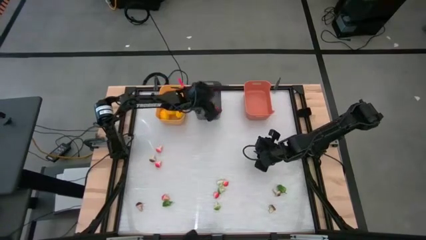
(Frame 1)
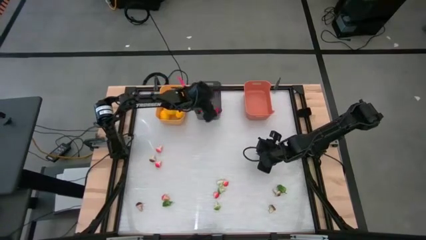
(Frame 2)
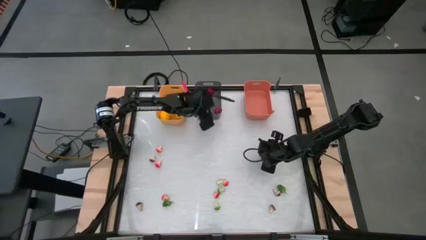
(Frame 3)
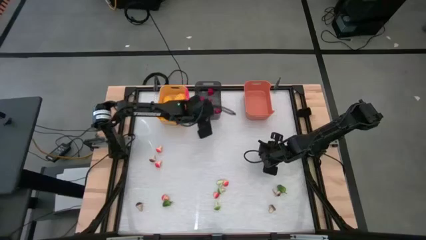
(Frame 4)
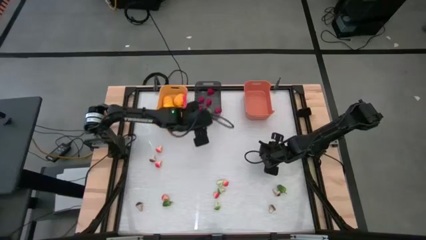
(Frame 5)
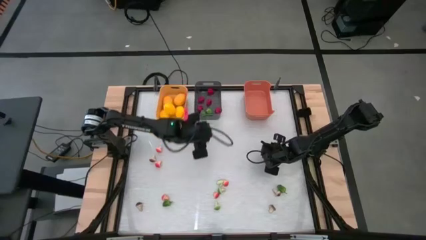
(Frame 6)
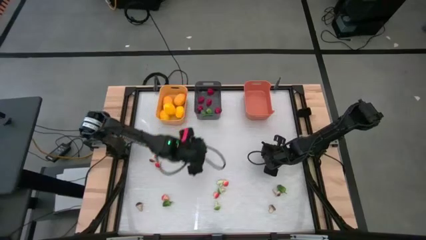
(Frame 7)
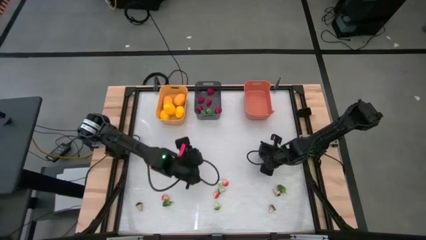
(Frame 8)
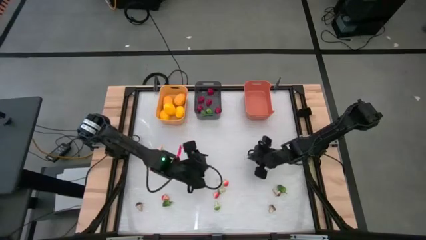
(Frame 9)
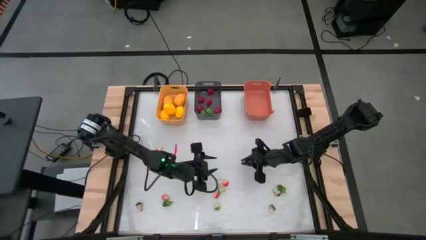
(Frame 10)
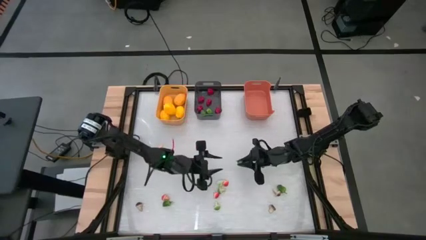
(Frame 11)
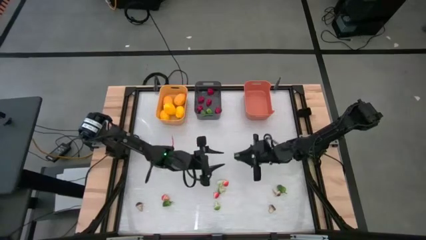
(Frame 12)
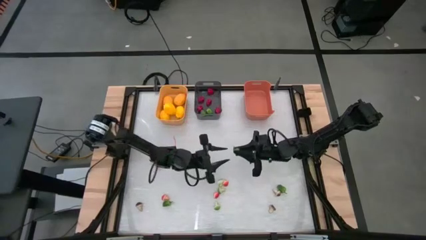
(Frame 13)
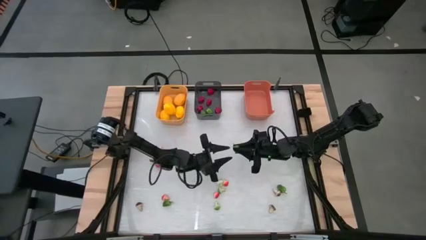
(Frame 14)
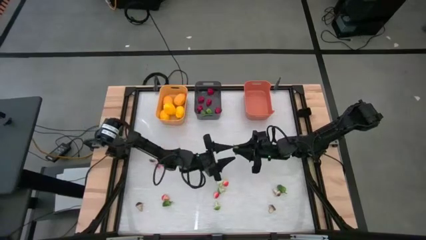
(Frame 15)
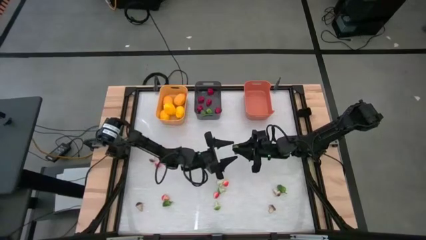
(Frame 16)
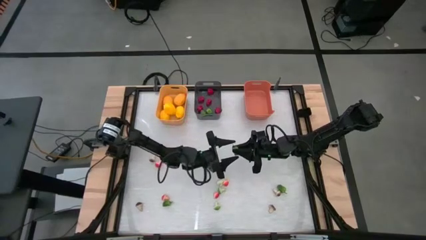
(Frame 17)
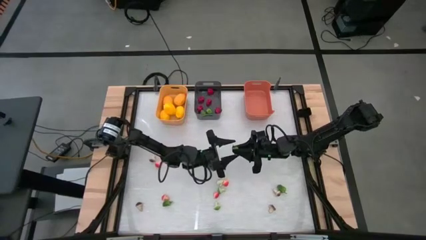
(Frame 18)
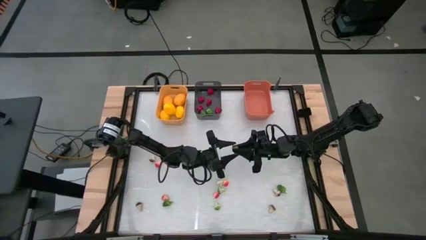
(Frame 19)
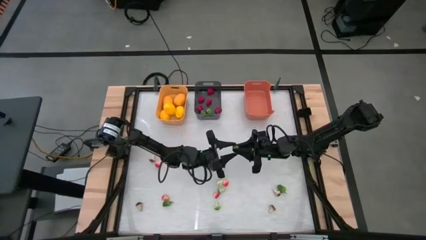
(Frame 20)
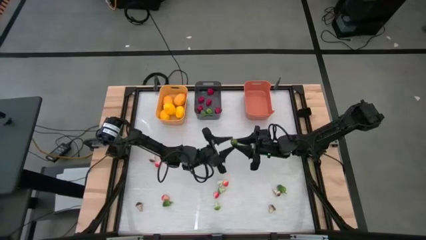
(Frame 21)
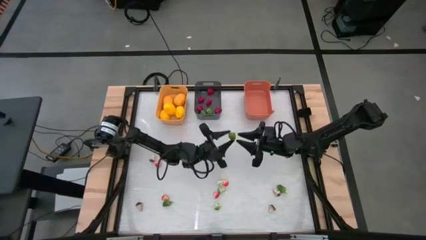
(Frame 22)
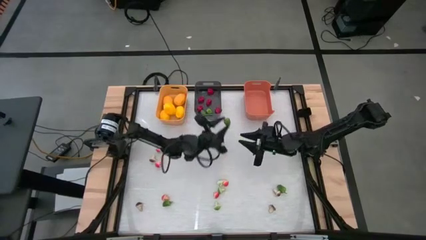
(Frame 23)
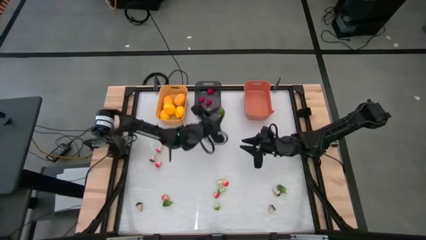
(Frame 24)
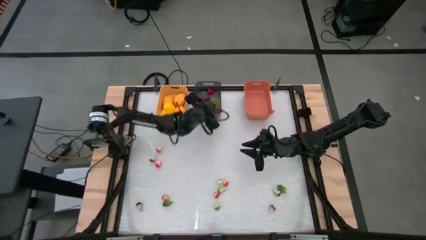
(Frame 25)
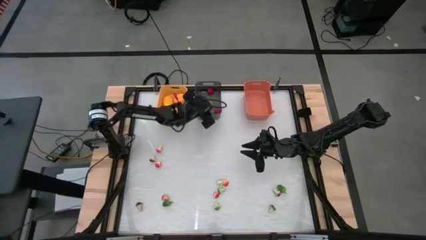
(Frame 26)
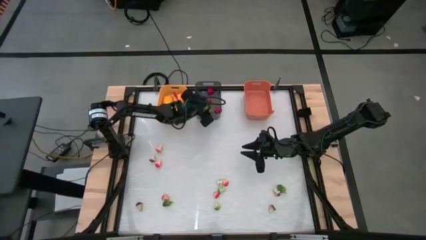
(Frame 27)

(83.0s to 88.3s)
Task: Sort produce into baskets
Put the green chili pepper into the black bin

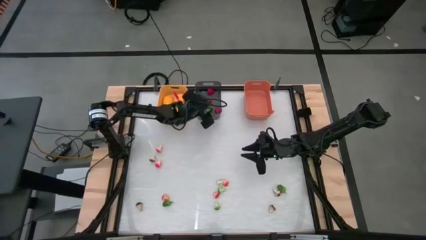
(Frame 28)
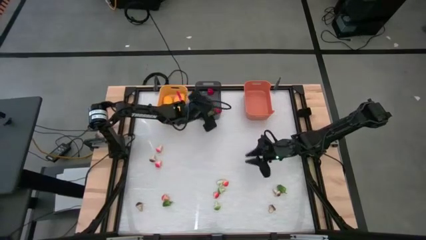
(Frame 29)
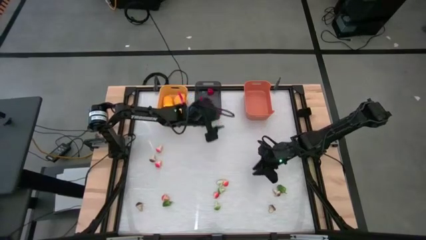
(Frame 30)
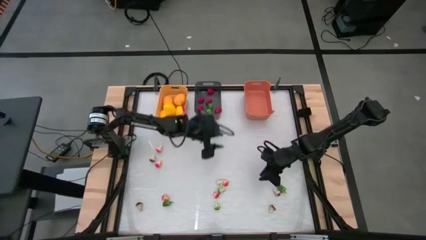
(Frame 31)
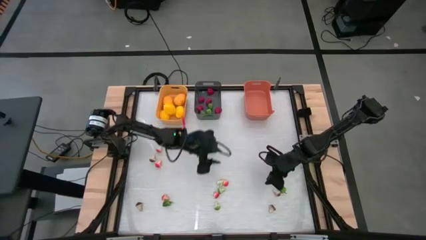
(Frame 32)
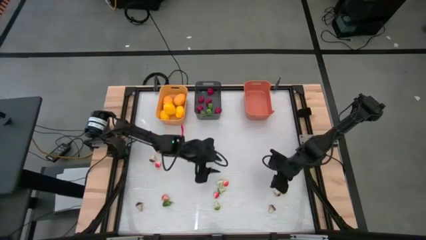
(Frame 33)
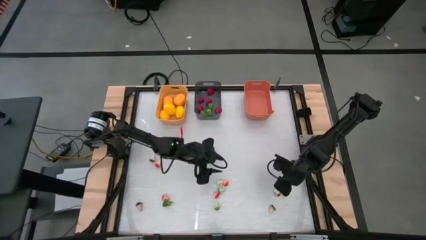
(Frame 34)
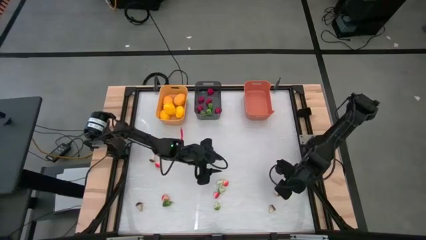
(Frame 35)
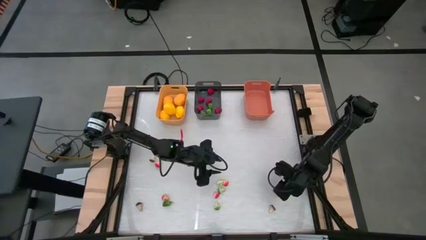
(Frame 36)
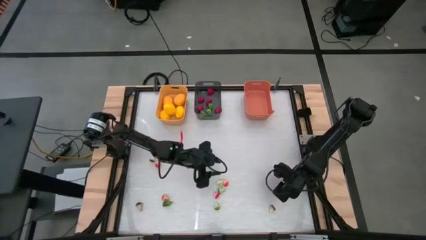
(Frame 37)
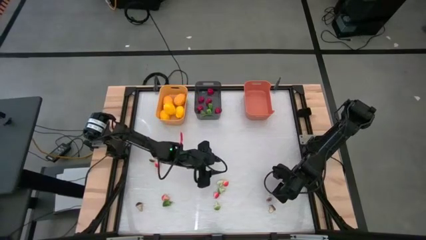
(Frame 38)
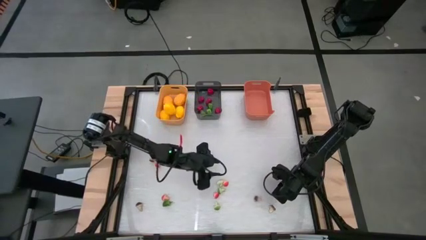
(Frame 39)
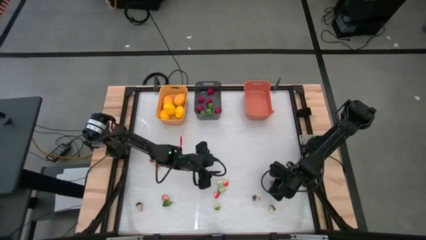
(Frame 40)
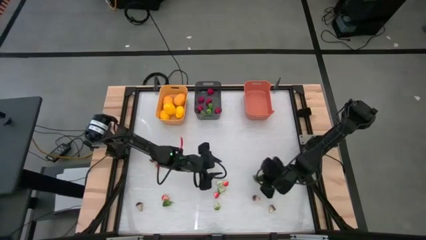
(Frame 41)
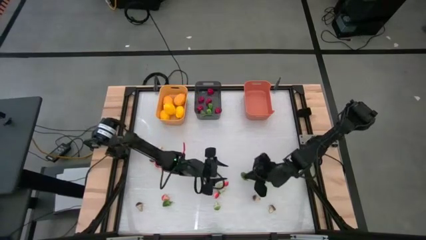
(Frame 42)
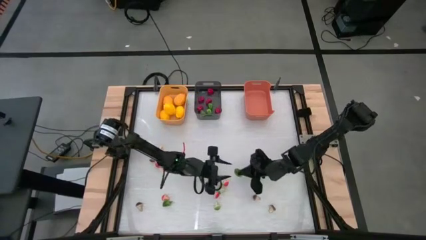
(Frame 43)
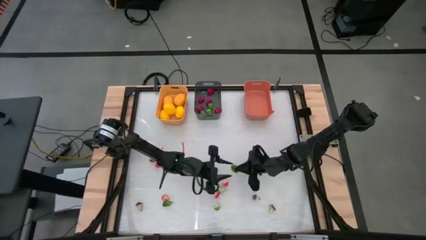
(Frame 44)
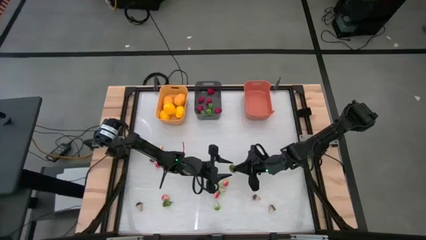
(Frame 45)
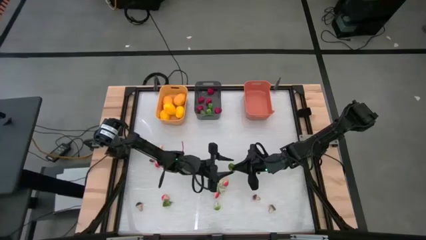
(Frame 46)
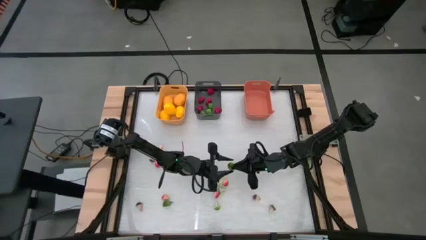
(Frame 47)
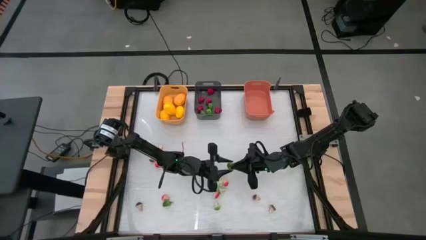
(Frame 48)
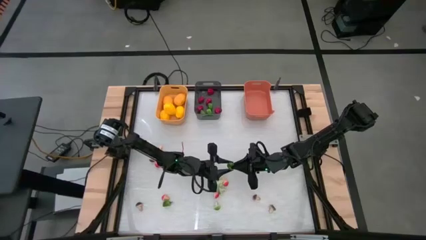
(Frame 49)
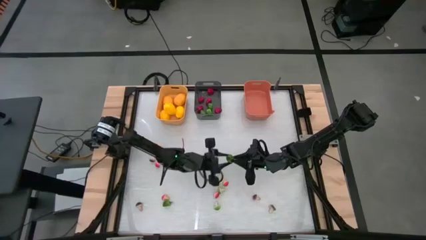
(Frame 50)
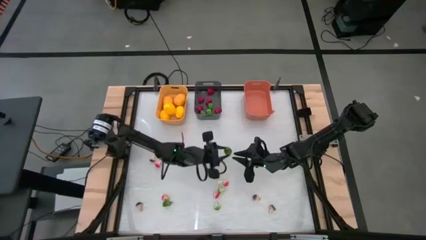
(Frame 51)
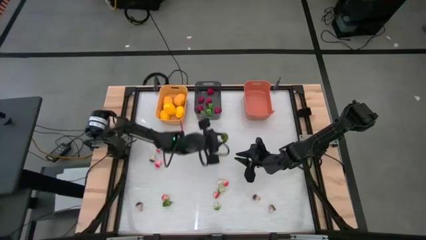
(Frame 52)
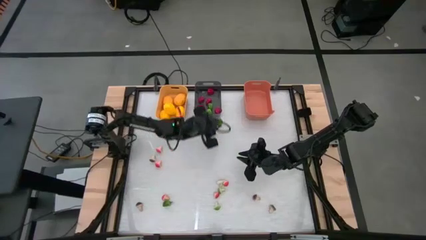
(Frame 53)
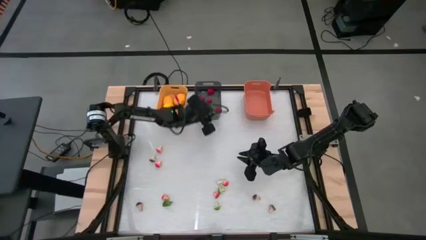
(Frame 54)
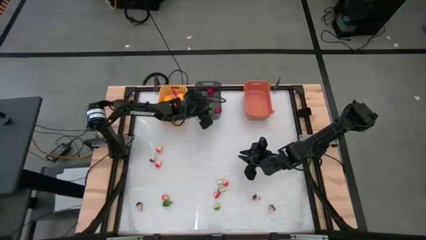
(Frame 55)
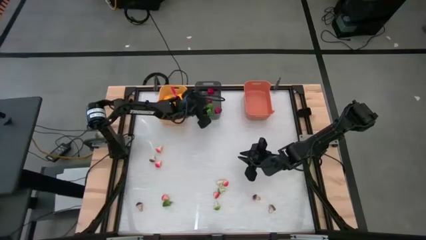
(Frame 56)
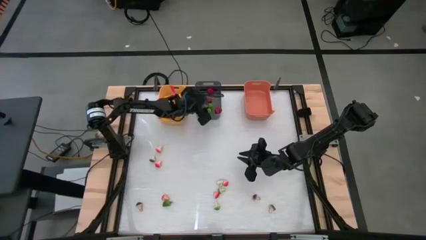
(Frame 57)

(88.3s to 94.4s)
Put the green chili pepper into the black bin

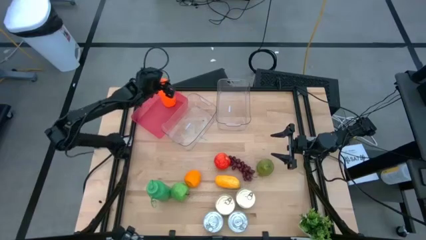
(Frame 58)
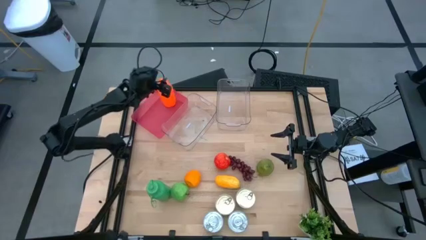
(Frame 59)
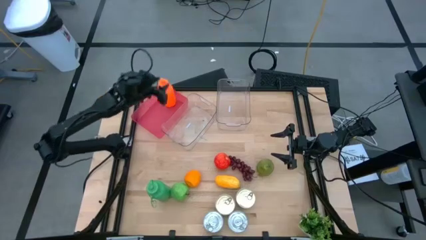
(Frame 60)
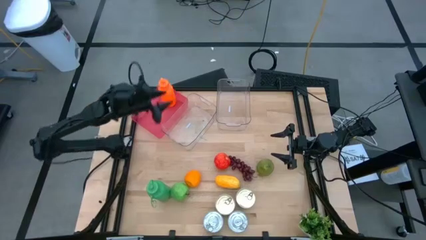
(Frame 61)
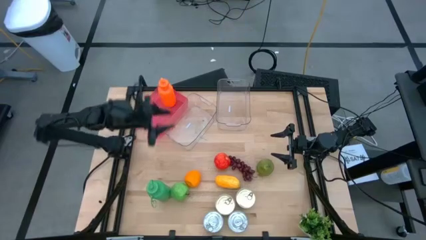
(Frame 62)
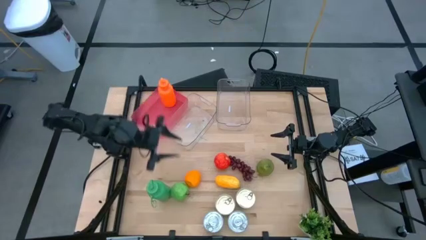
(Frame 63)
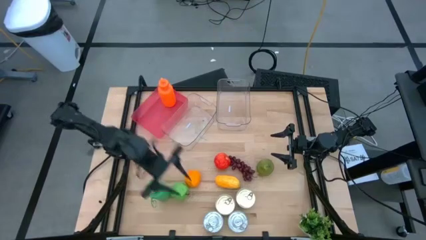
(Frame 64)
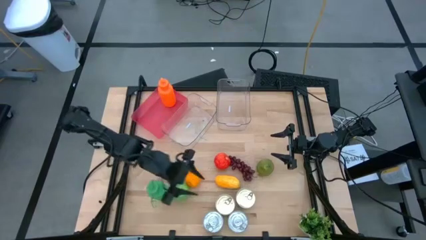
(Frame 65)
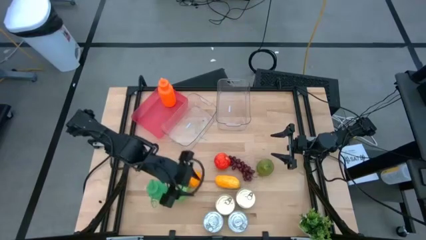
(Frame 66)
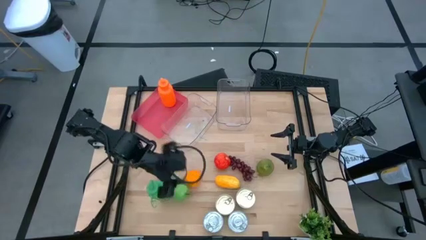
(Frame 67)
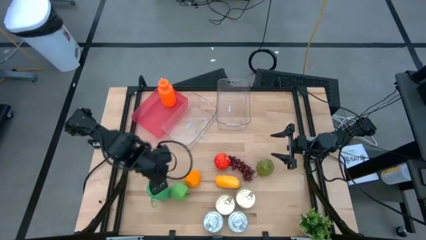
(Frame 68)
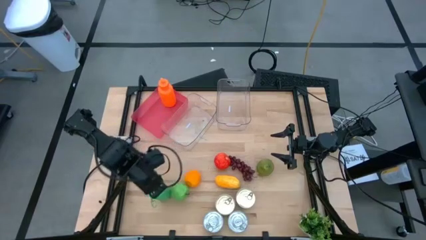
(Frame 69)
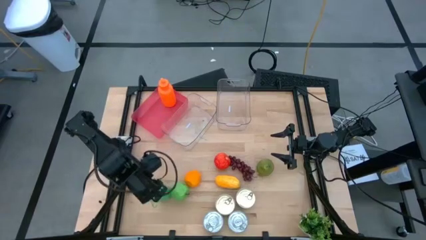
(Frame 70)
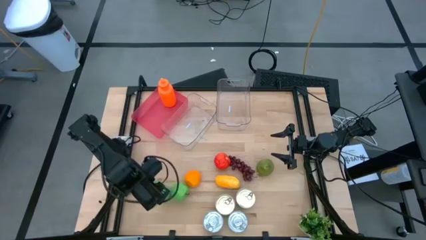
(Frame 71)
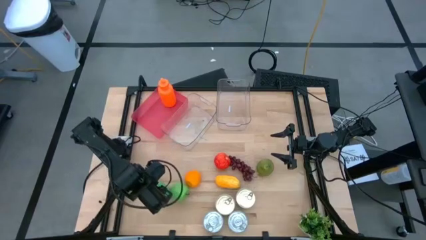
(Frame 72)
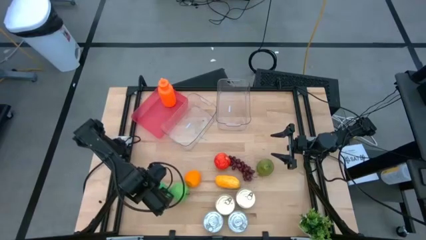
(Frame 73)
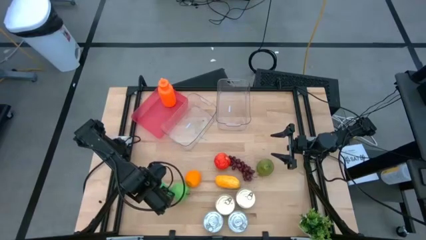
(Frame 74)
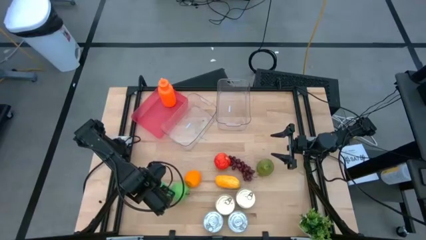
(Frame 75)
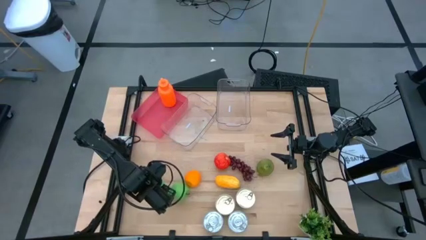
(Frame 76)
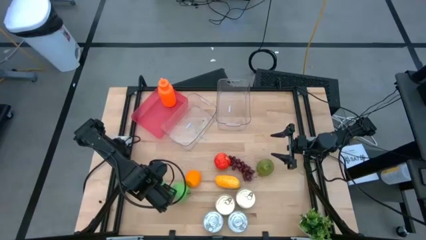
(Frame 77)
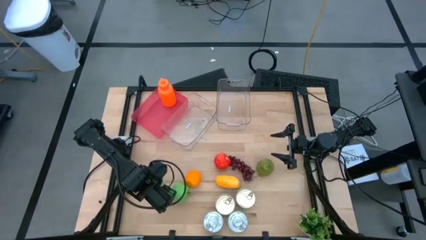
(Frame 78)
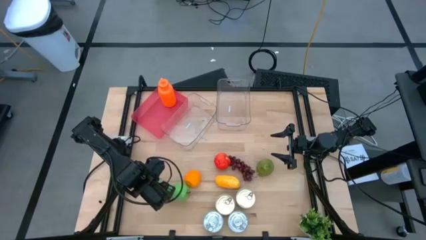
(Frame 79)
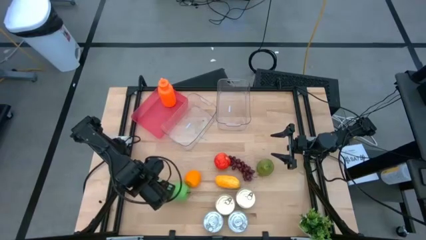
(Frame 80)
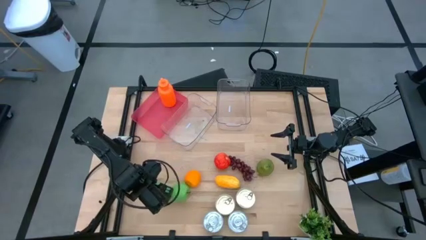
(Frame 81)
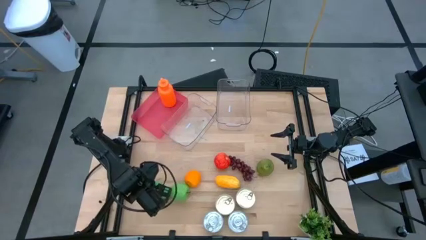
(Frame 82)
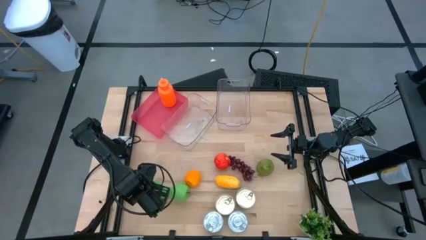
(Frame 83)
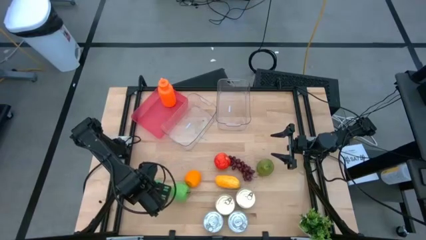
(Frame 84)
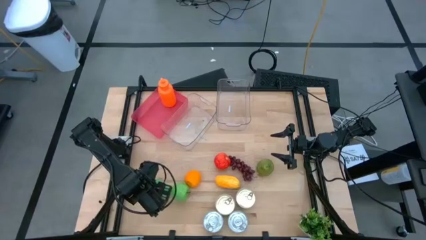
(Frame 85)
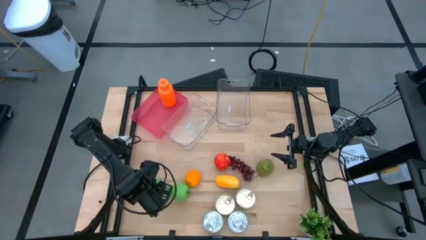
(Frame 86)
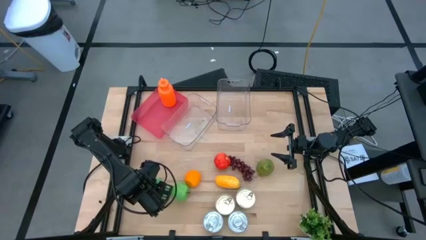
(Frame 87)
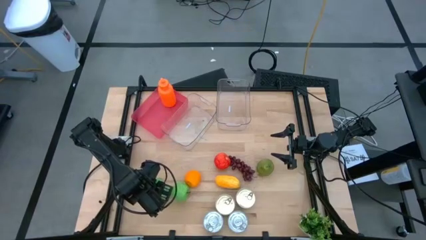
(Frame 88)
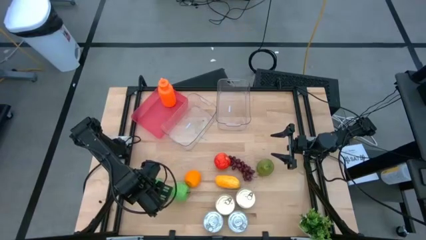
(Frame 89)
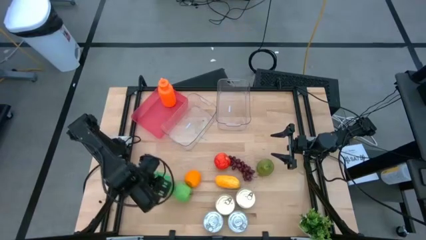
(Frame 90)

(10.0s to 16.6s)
Task: Pick & Place Food Item
Put the green water bottle into the pink bin
